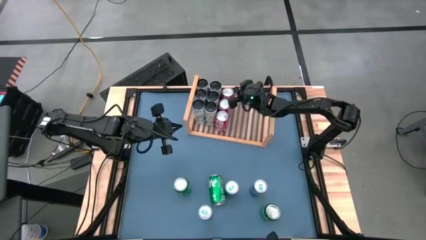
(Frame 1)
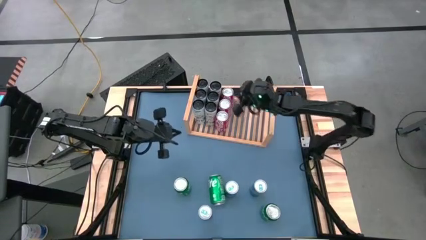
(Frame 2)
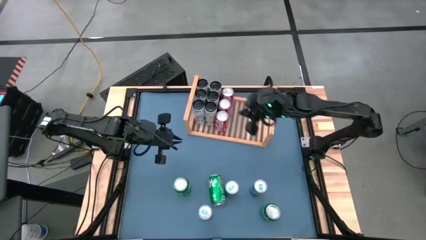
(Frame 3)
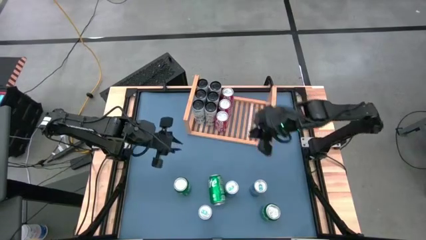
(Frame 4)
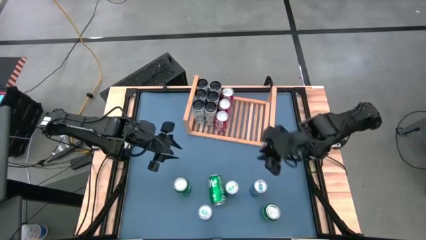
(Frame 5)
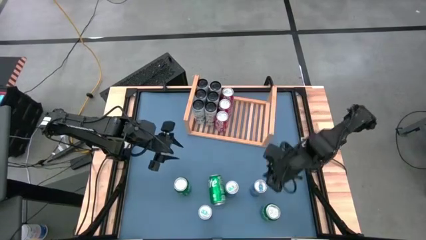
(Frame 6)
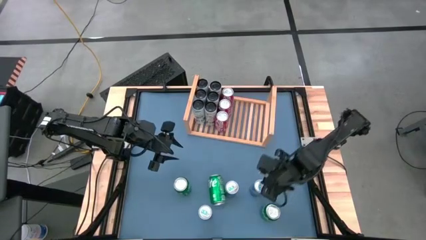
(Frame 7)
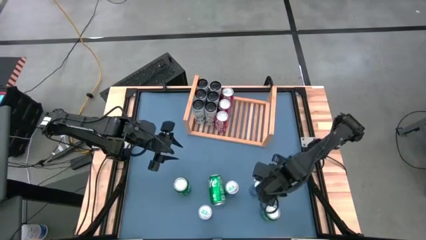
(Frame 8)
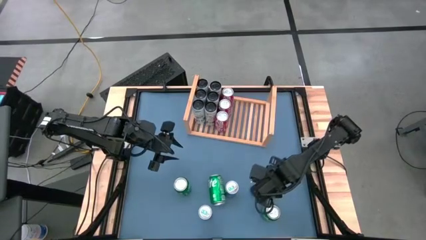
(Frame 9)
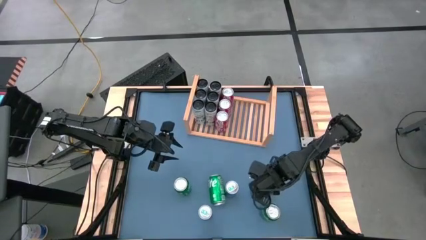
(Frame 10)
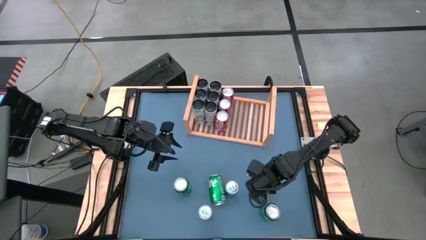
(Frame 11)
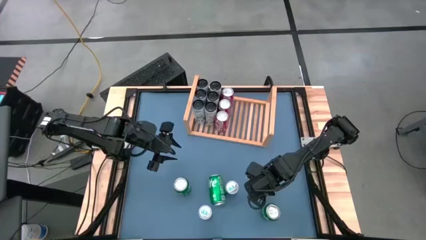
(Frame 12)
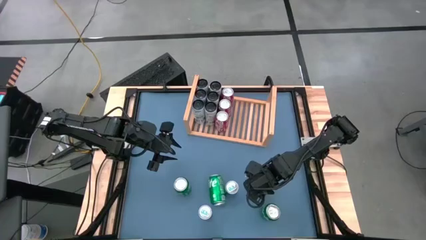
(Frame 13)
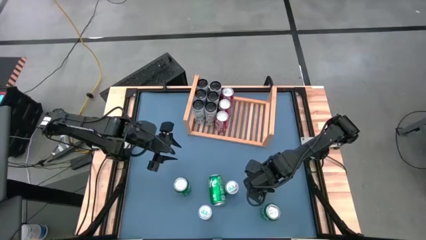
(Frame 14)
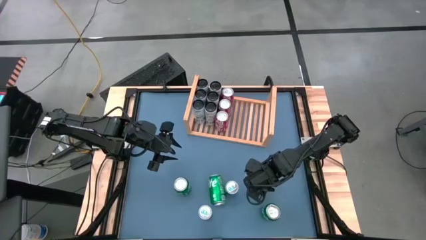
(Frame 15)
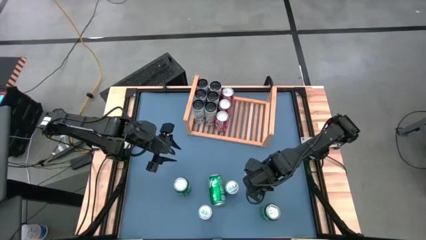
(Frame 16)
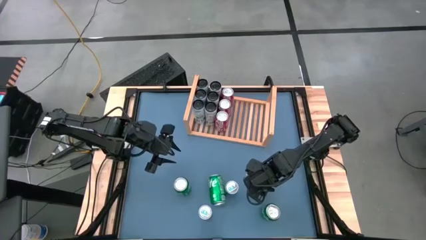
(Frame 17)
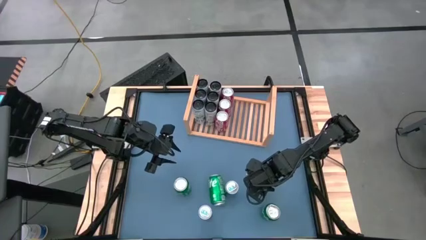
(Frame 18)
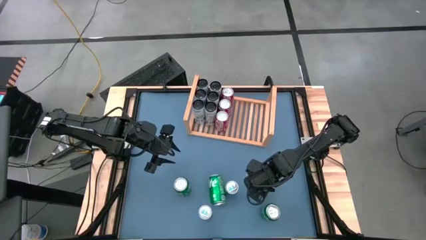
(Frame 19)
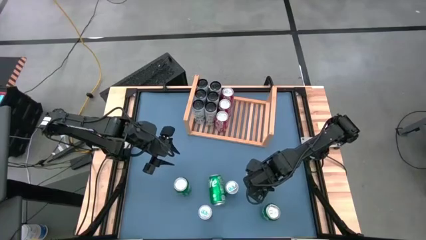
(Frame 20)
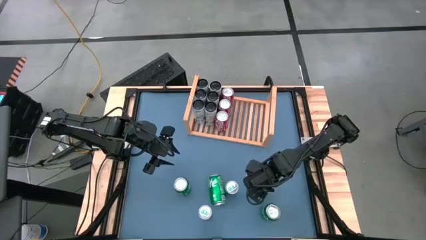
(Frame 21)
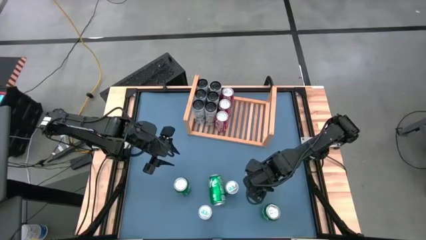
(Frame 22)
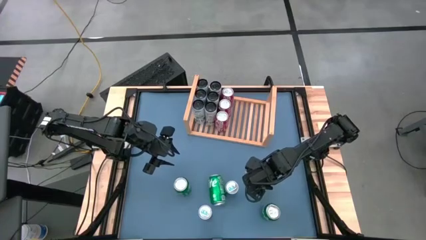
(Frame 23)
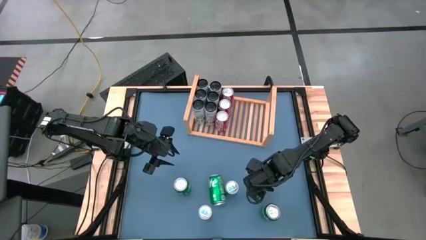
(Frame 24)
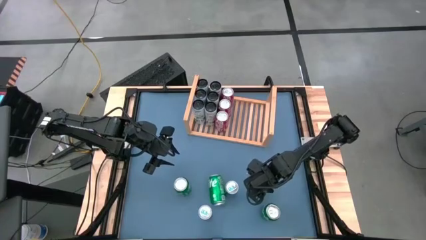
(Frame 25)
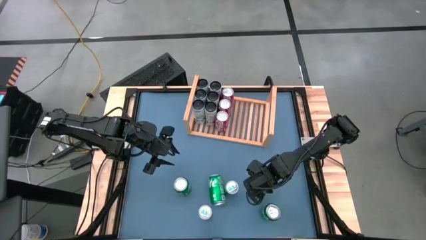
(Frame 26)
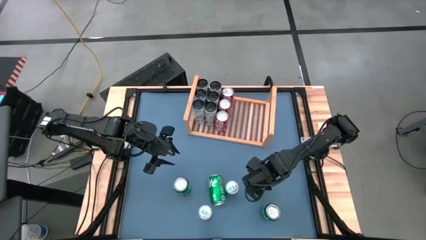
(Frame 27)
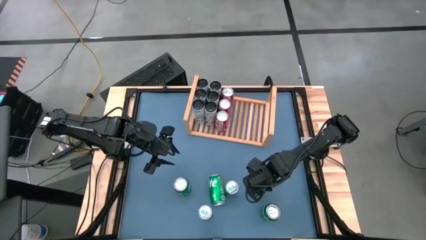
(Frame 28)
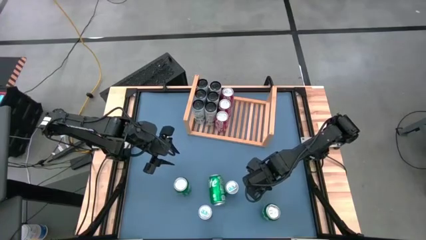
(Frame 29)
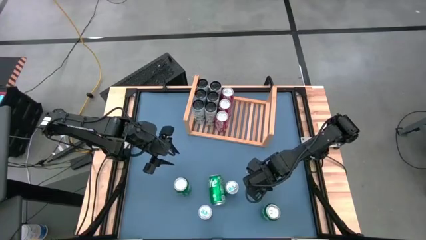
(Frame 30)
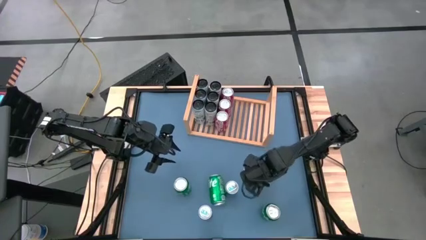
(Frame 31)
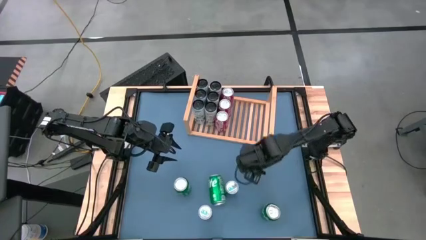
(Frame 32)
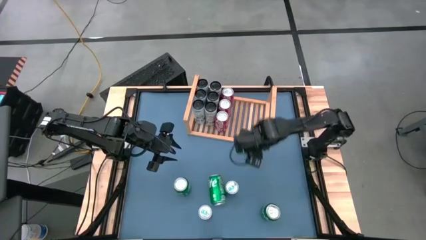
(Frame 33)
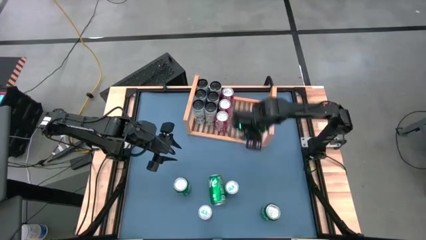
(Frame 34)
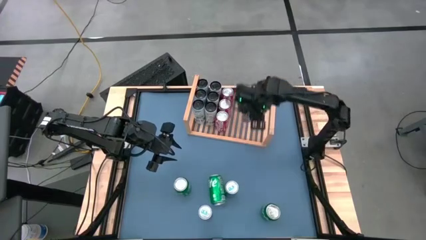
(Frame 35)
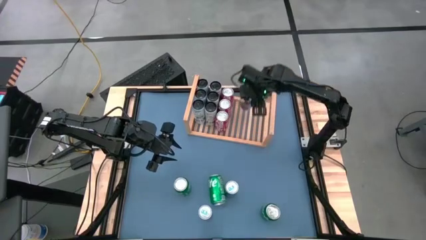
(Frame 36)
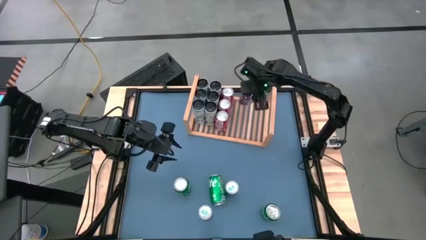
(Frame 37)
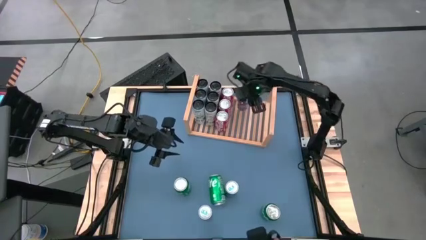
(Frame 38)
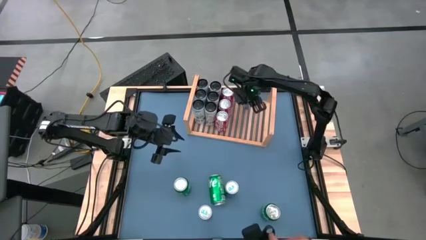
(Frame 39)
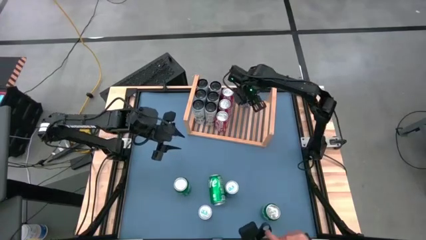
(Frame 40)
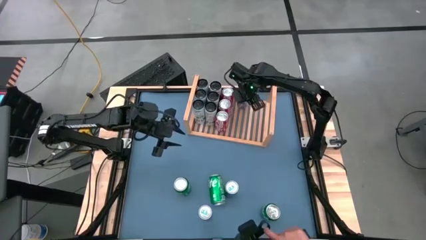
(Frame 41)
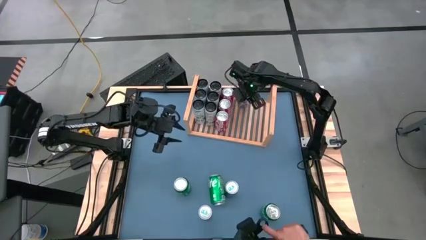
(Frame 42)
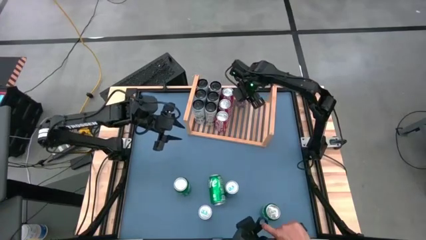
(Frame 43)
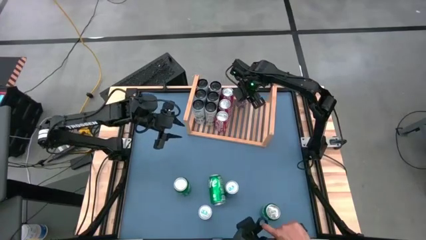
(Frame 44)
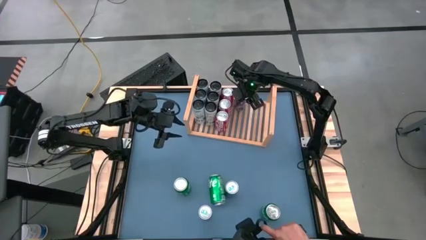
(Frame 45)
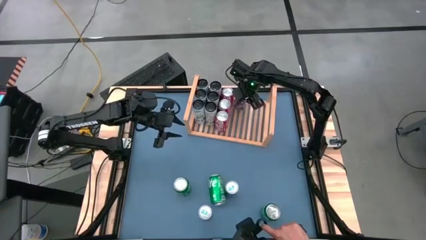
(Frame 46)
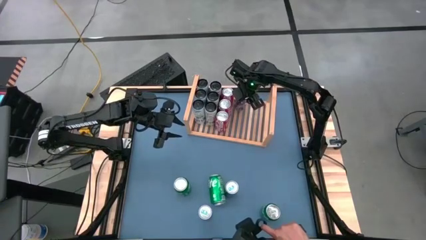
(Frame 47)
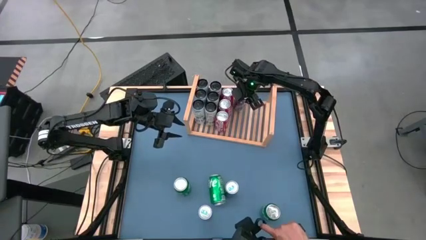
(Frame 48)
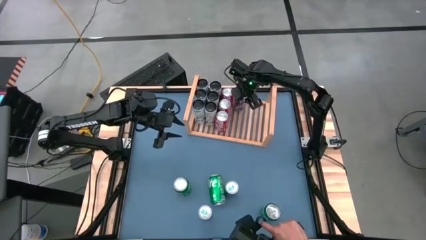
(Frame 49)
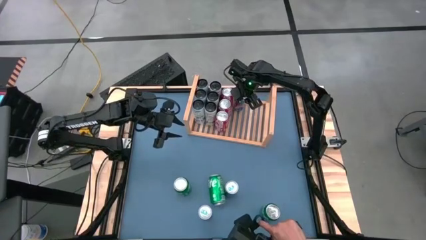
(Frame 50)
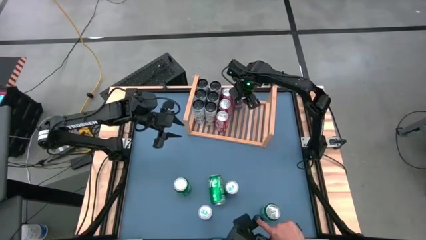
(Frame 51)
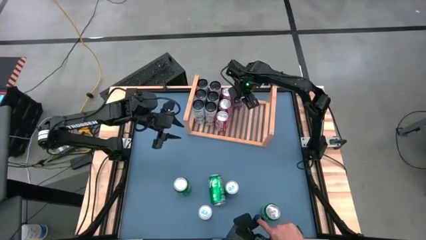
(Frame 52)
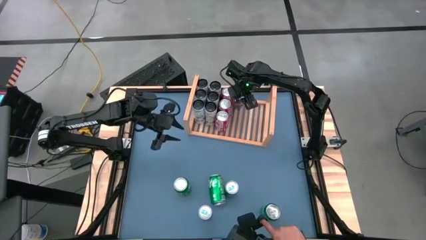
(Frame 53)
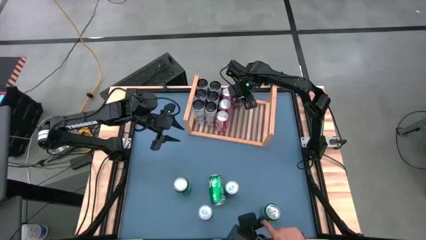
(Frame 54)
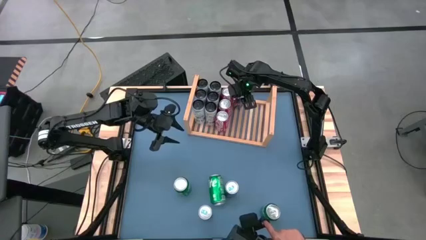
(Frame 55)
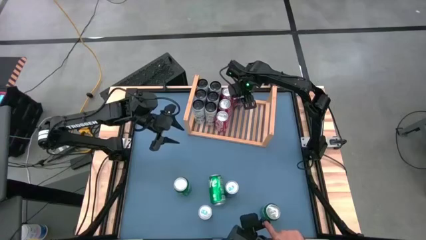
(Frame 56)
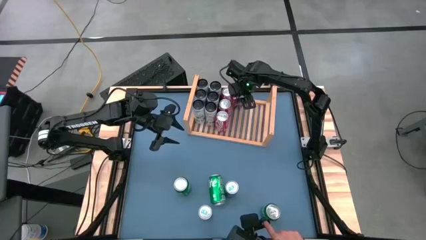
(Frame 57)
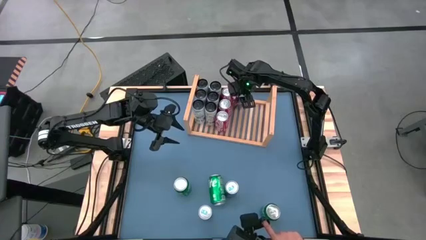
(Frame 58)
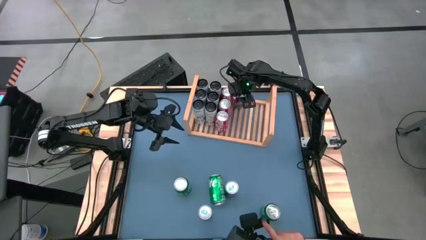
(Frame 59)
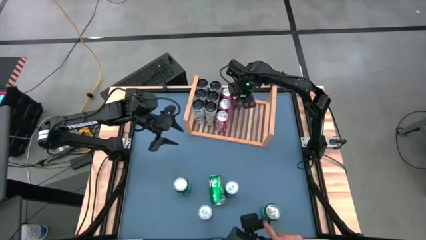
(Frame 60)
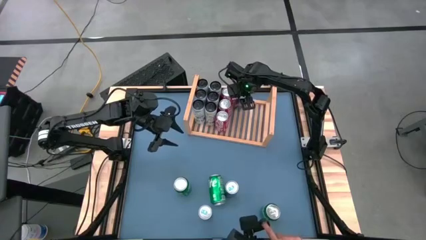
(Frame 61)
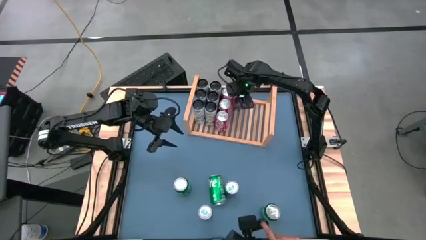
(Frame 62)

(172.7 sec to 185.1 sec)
Task: Place canned beverage on shelf
Put the blue soda can on the shelf

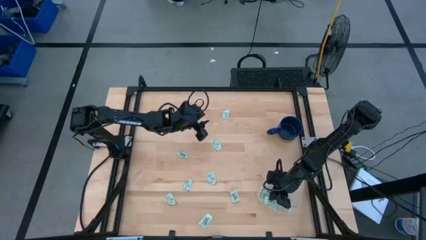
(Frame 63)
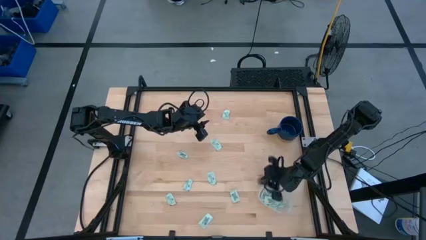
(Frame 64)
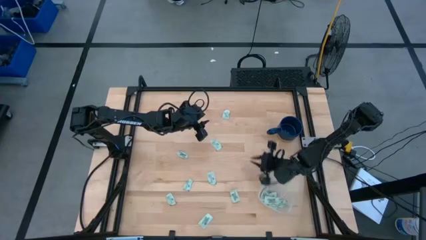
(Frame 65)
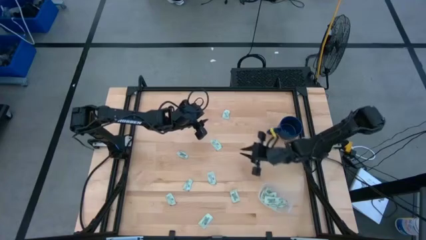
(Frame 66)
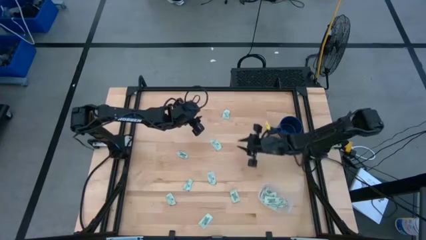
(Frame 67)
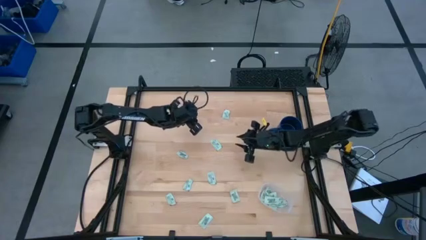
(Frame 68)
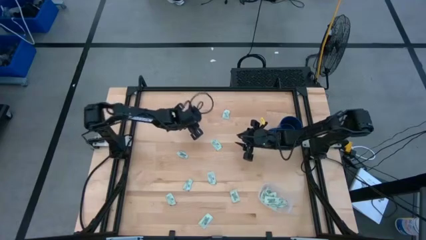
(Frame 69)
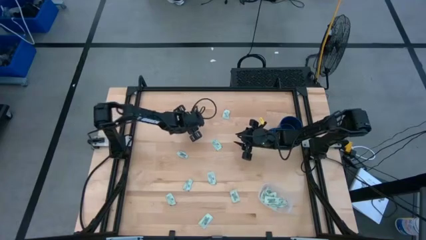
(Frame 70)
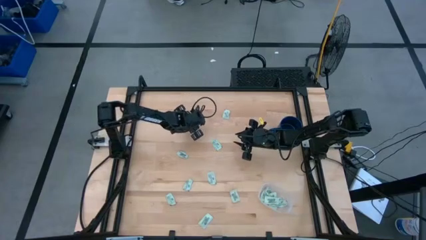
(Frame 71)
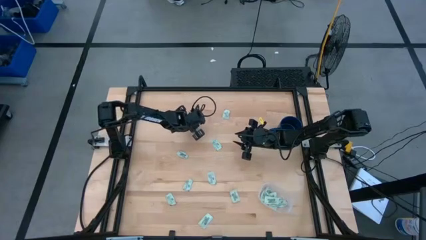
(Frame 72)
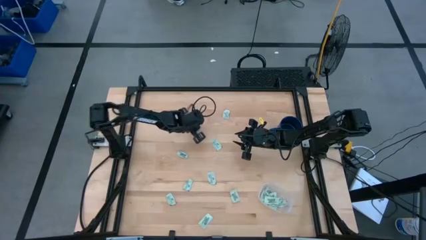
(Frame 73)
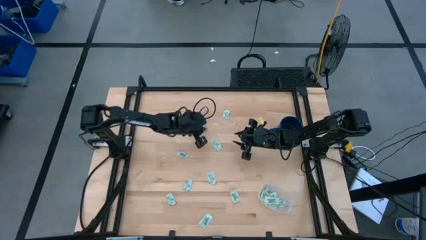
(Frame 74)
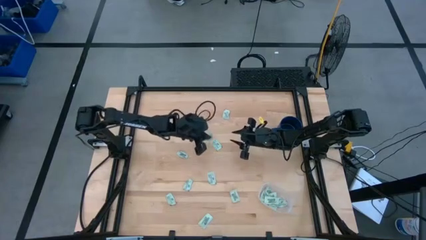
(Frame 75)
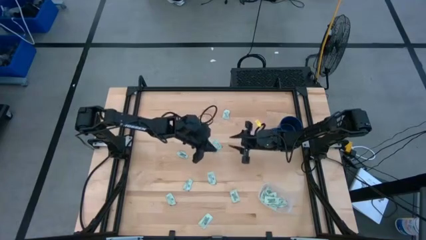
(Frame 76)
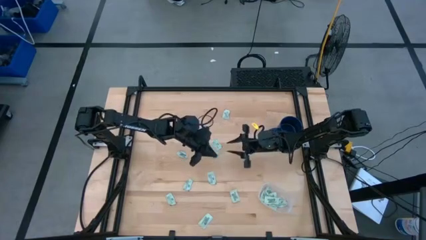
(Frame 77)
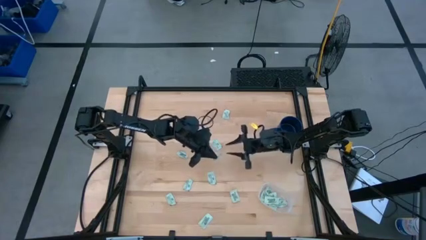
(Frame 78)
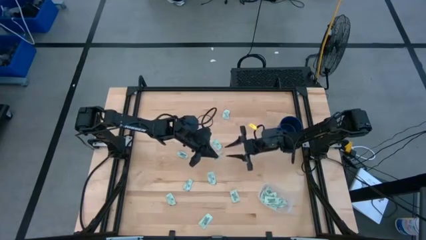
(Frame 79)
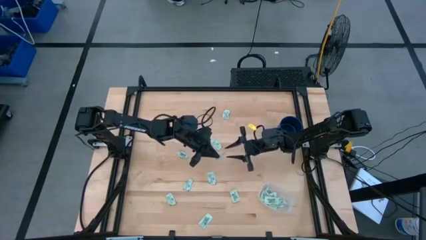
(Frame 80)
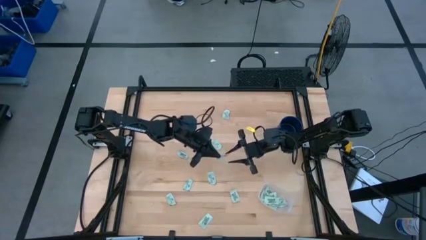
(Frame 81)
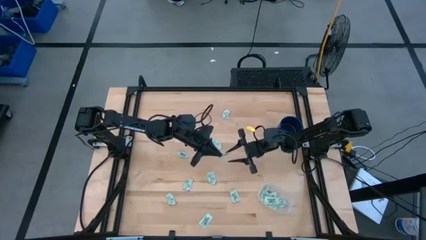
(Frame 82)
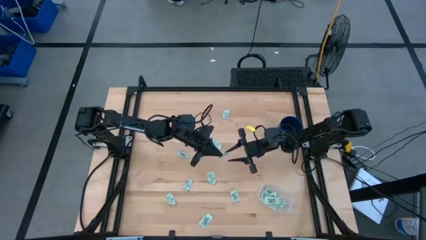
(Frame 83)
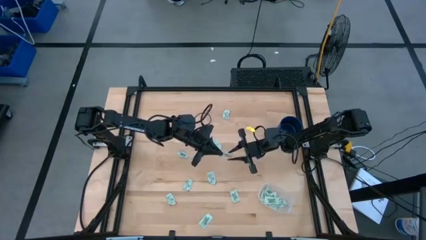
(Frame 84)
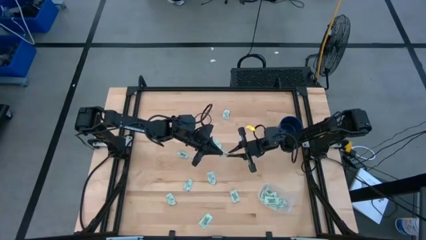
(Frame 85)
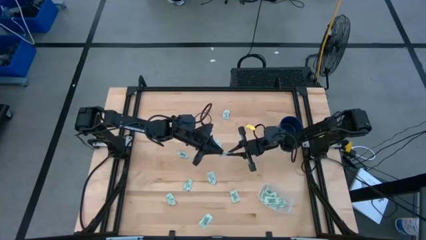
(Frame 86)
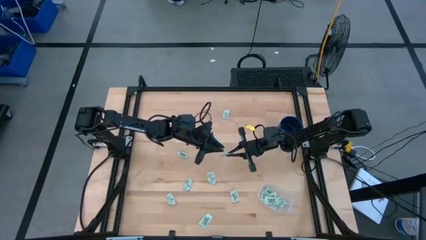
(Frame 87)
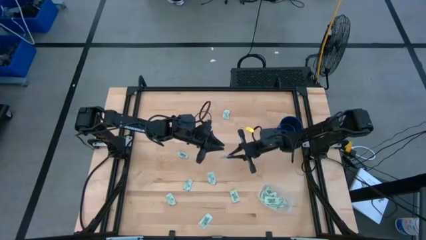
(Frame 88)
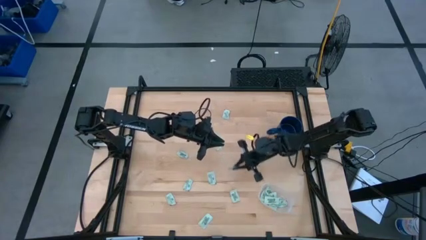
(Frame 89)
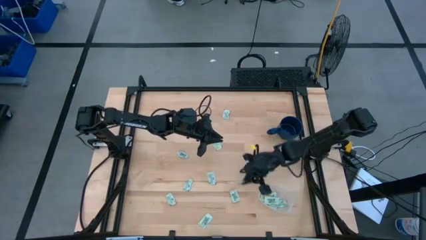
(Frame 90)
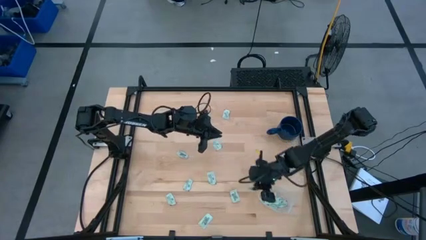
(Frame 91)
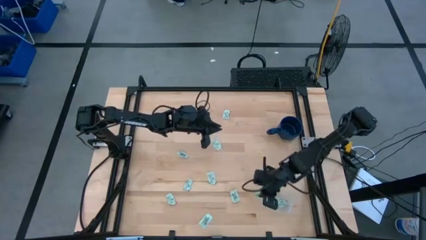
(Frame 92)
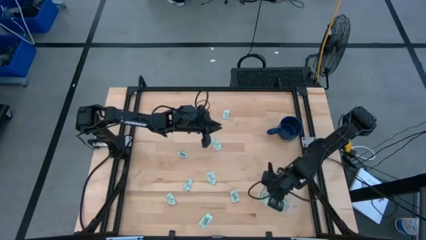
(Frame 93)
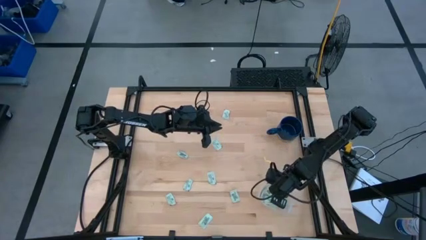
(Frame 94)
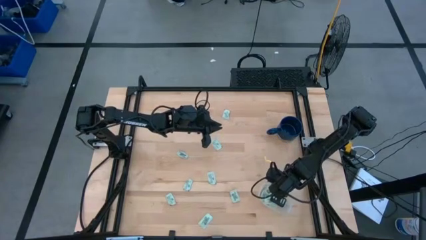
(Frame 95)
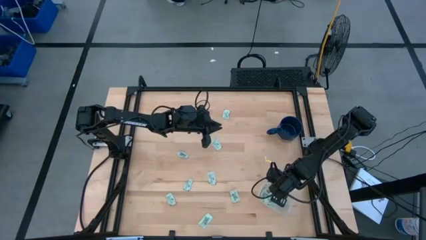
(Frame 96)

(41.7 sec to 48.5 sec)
Task: Pick and place Stevia / Truvia into bins
Put the stevia packet into the transparent container
